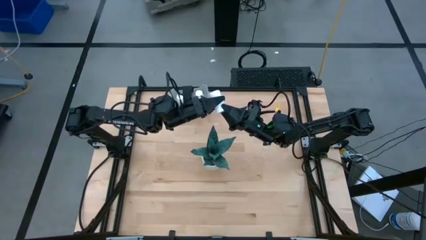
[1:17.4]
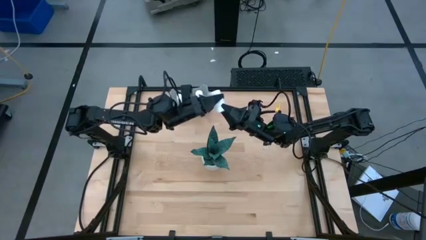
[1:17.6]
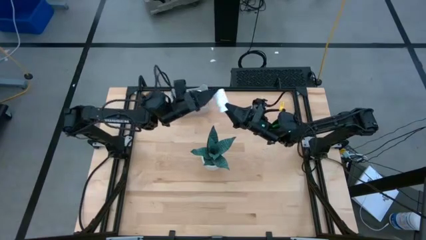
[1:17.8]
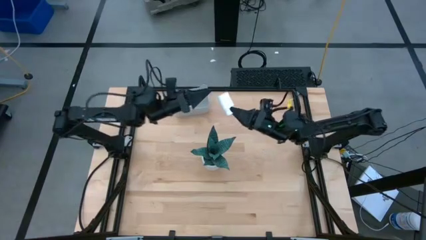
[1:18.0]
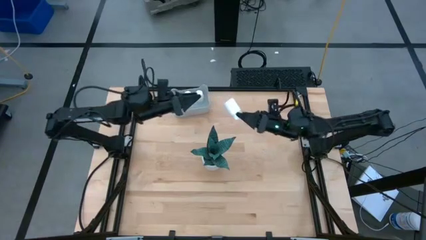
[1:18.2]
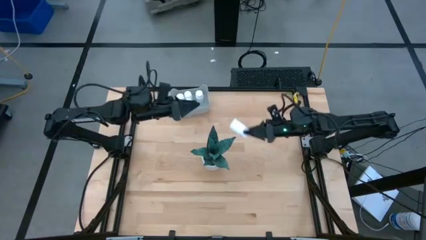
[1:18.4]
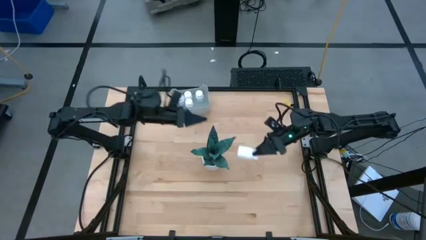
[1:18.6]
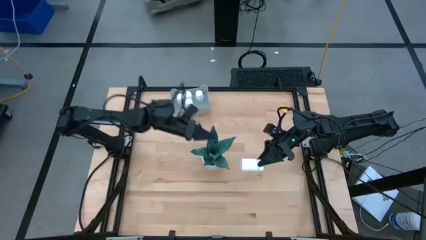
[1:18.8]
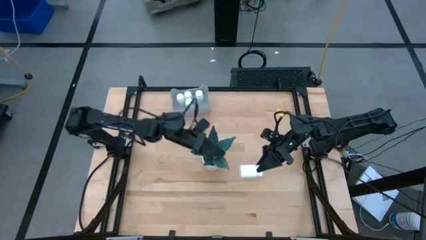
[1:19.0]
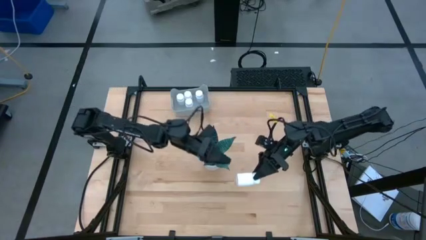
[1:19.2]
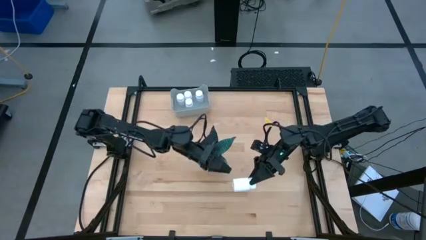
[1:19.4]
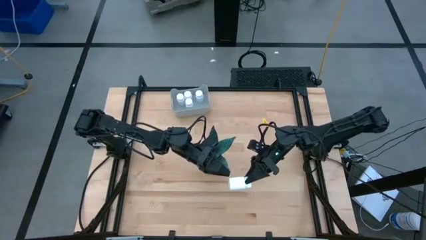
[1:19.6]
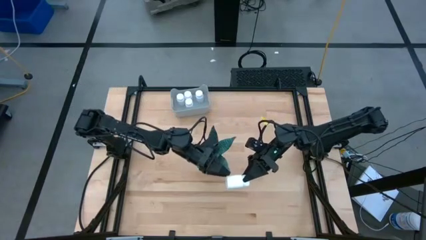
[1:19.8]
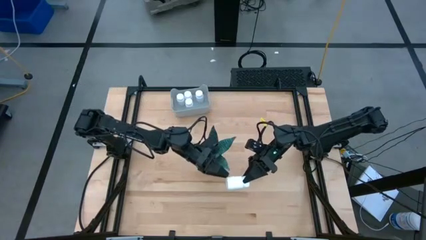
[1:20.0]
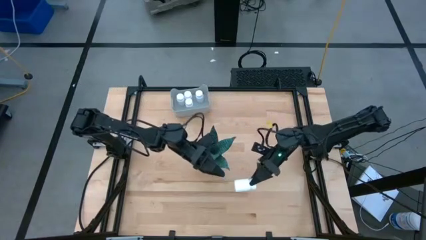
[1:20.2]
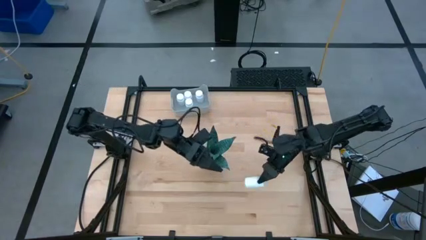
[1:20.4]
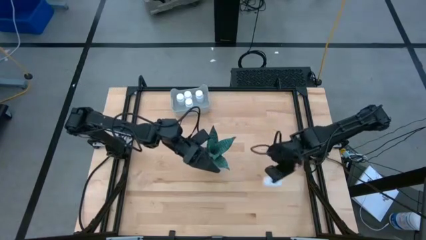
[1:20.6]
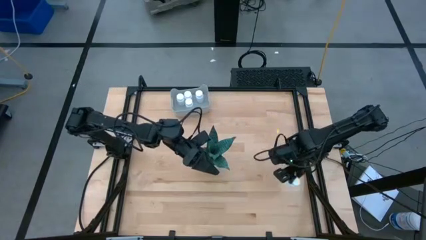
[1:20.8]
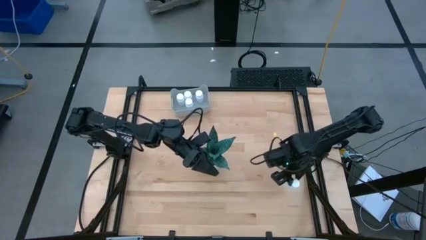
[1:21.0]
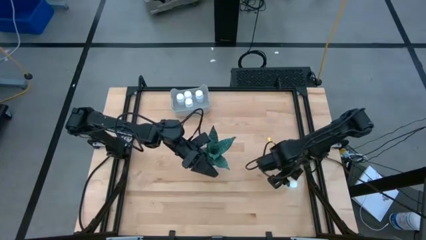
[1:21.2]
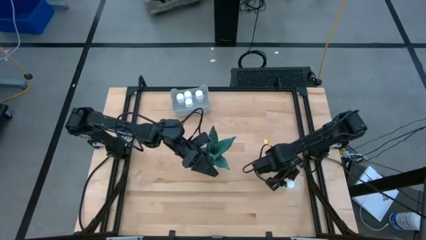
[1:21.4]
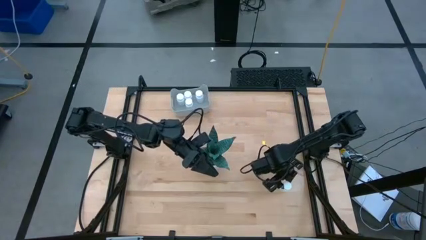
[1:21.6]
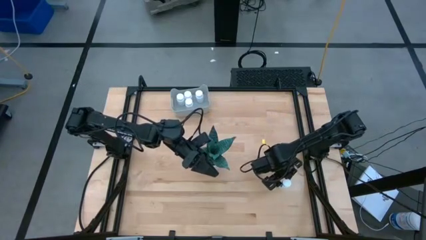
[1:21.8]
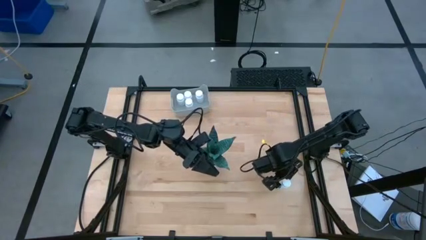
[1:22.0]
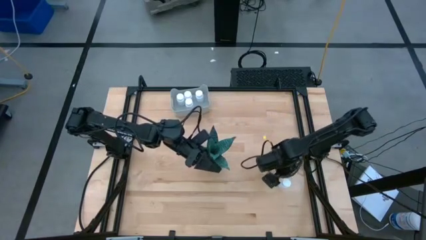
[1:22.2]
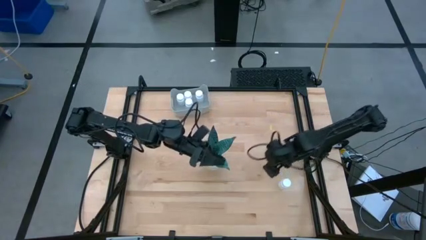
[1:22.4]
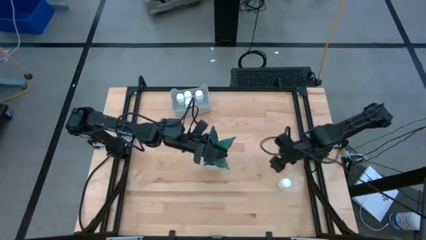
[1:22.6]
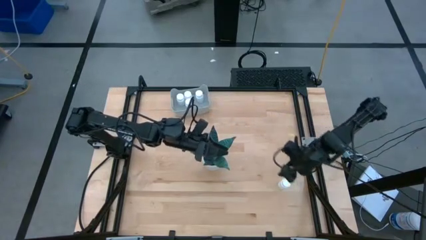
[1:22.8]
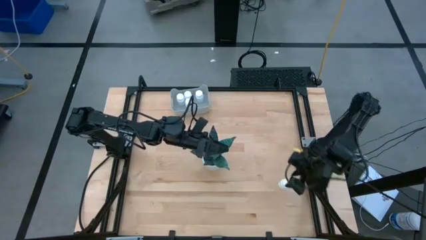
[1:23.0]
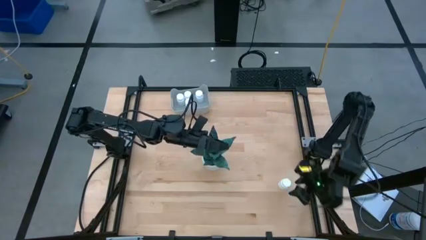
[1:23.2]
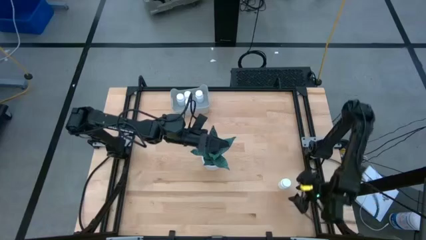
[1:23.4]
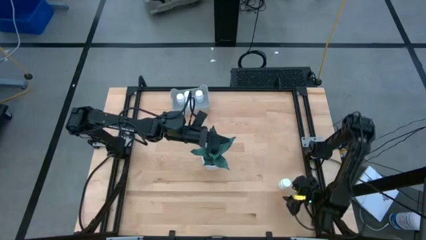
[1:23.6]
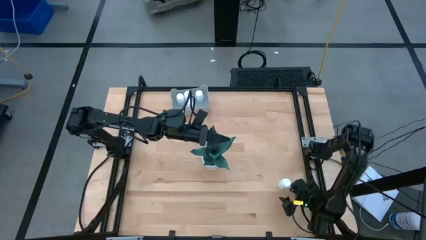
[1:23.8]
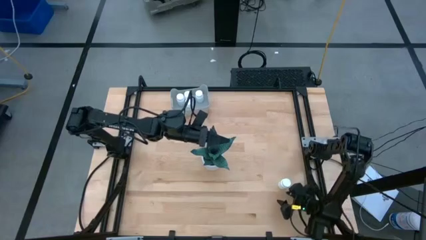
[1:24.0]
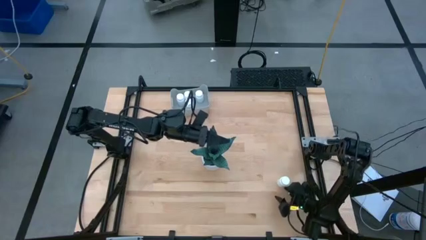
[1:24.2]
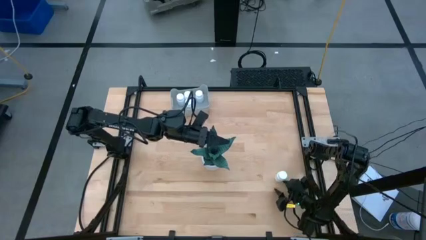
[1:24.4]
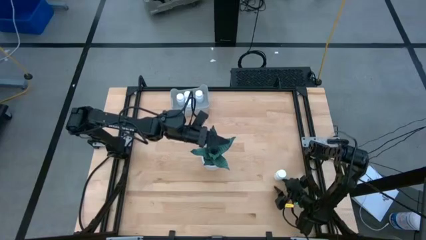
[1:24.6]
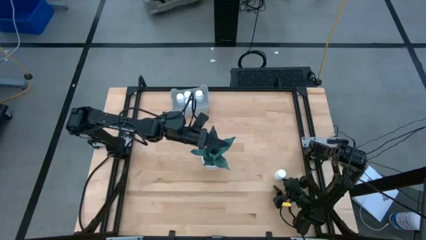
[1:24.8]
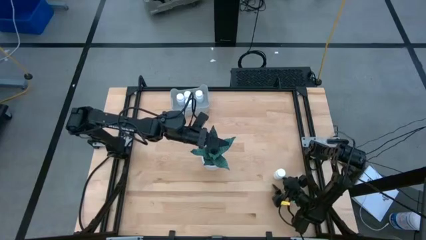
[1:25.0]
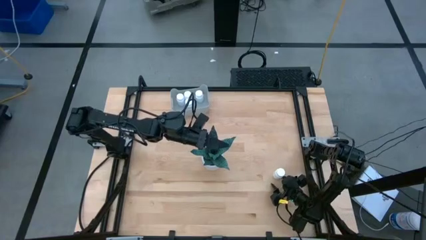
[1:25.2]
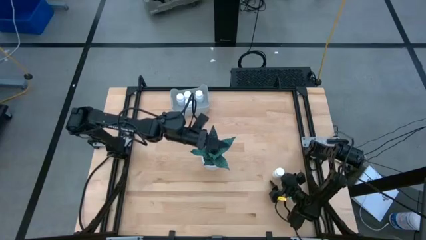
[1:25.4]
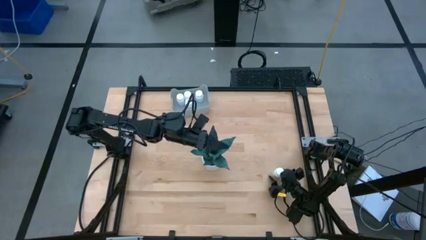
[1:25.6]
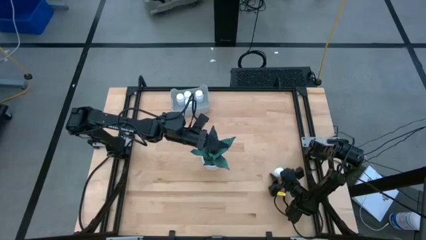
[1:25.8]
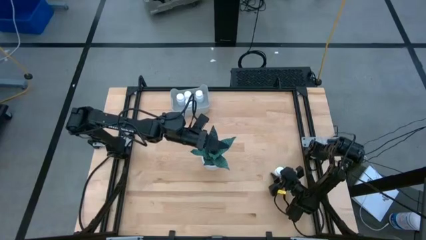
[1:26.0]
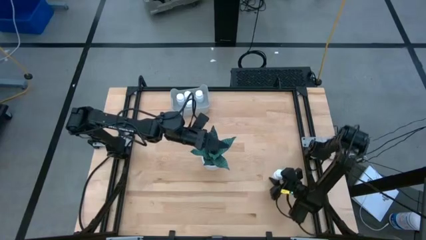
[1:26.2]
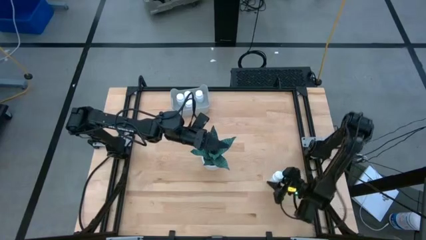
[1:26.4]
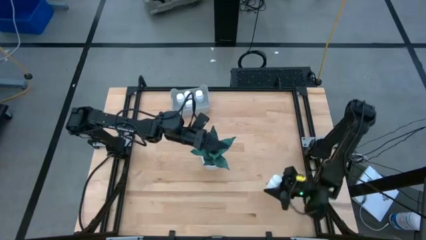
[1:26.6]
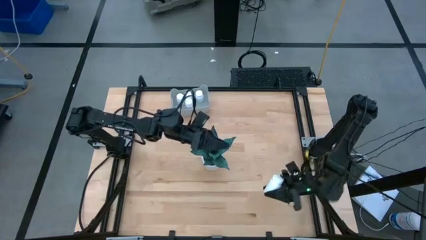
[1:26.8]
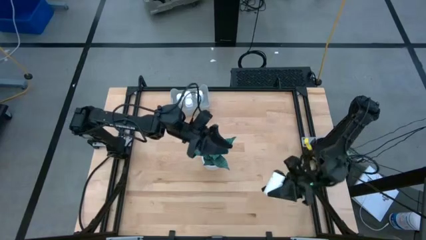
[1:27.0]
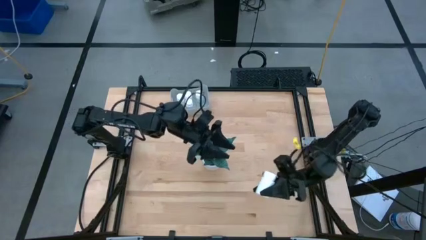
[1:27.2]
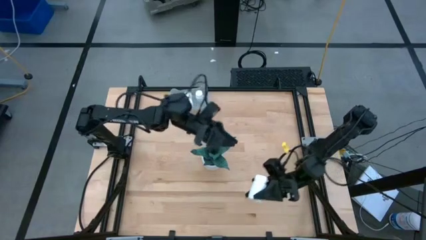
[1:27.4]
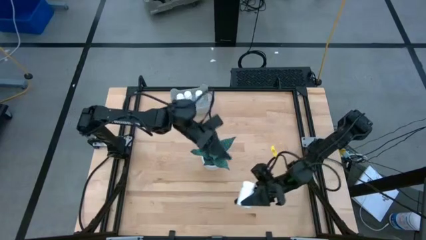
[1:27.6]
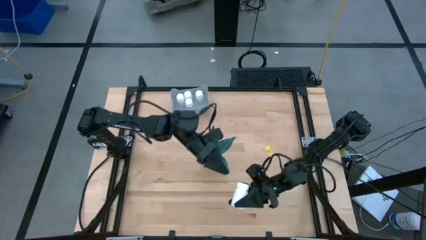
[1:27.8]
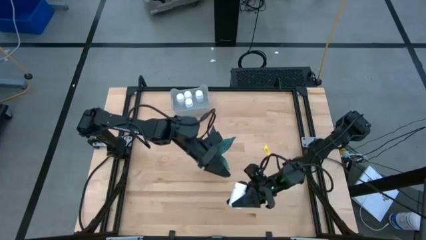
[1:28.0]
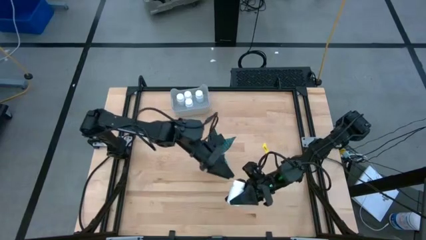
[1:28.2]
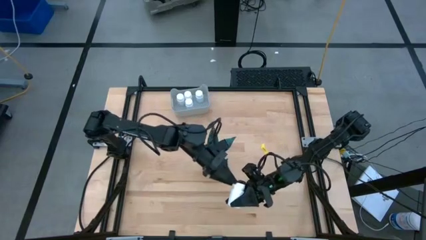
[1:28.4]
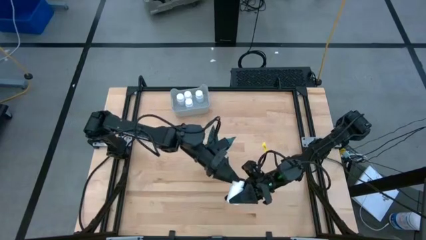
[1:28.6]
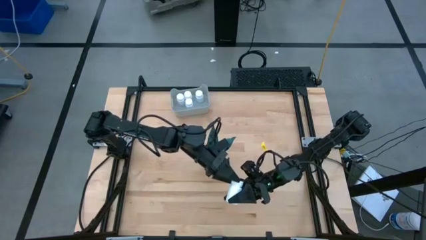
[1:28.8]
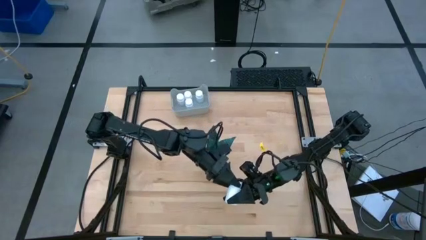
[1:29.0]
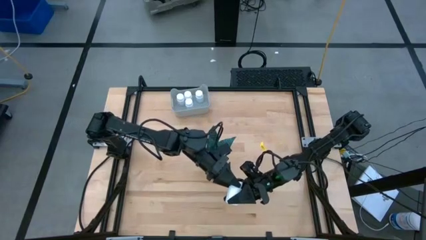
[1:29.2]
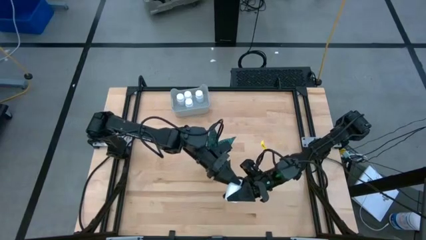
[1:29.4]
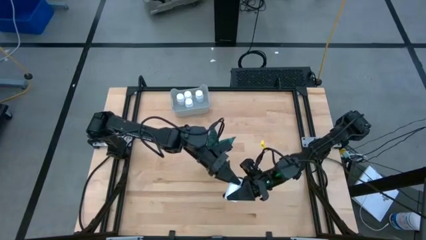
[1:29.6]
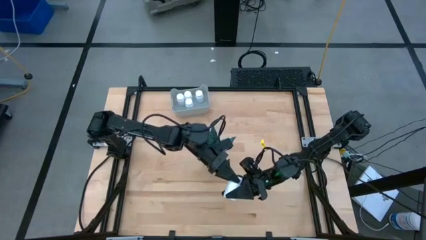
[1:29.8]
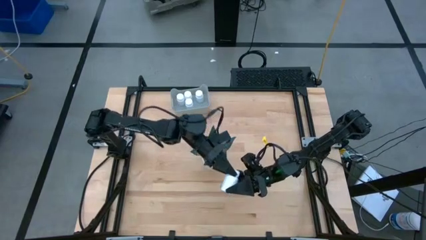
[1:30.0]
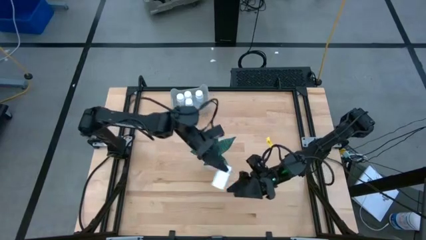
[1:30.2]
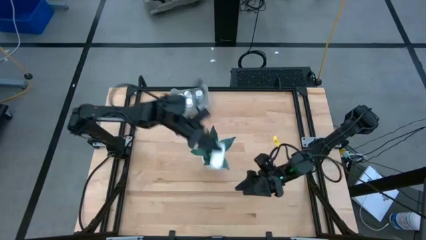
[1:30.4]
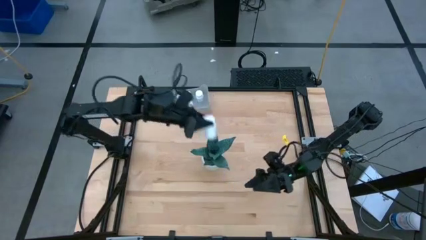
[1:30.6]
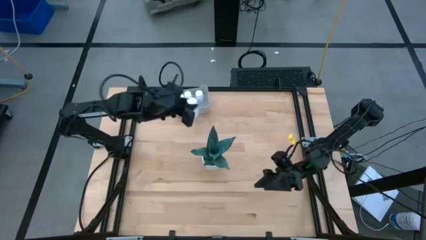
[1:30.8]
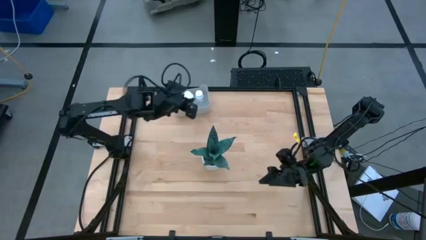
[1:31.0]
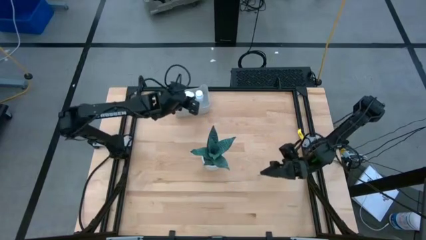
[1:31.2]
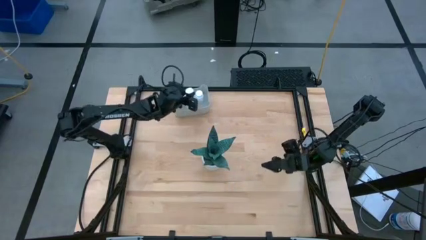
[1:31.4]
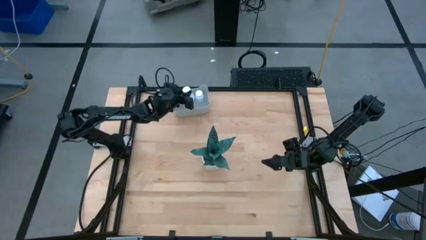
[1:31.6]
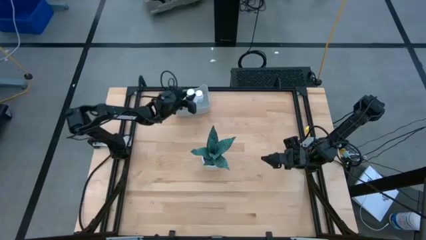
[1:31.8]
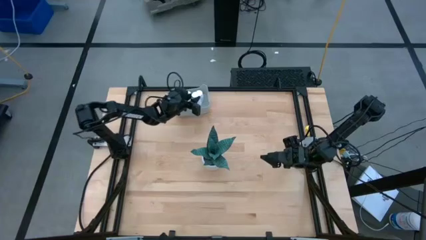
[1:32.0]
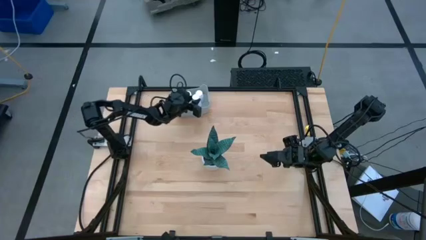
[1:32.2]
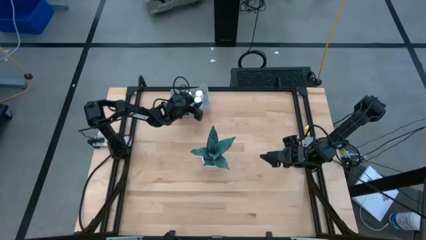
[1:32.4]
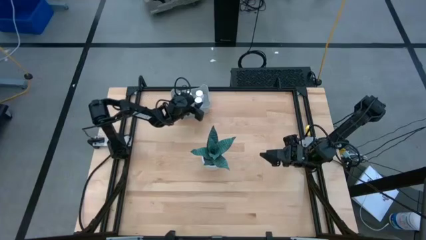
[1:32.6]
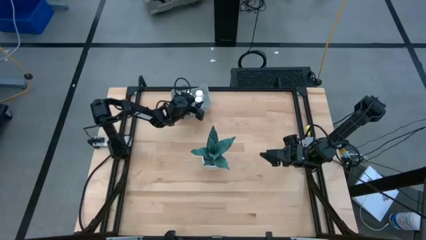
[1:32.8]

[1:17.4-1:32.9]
Task: Pick and place pill bottles into a basket
Put the white medicine bottle into the gray bin
